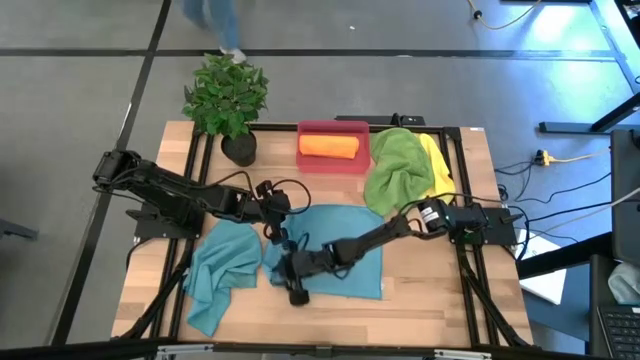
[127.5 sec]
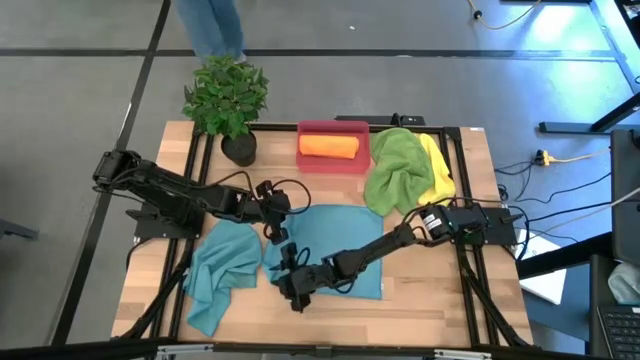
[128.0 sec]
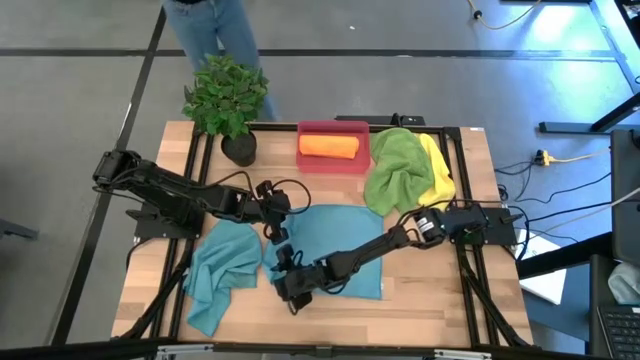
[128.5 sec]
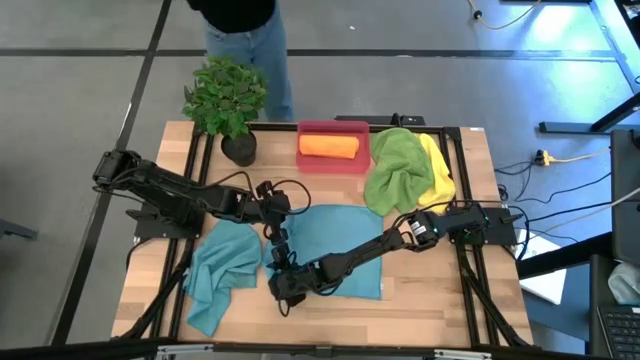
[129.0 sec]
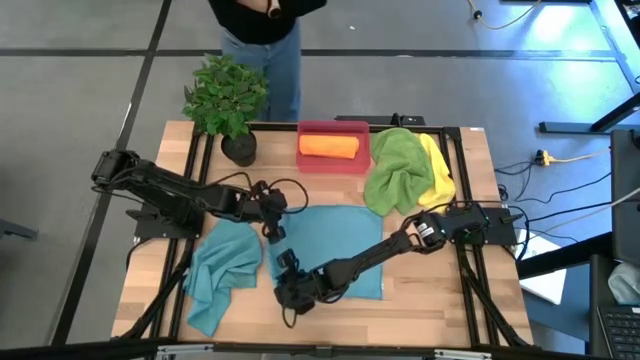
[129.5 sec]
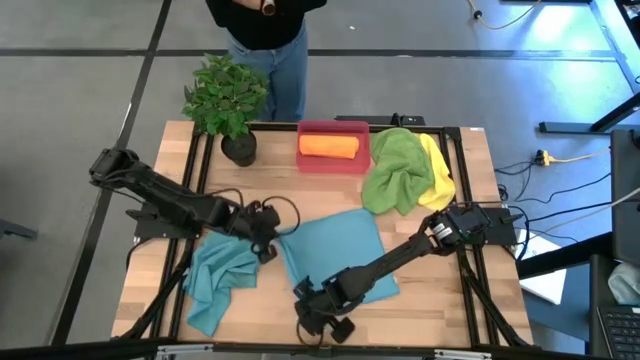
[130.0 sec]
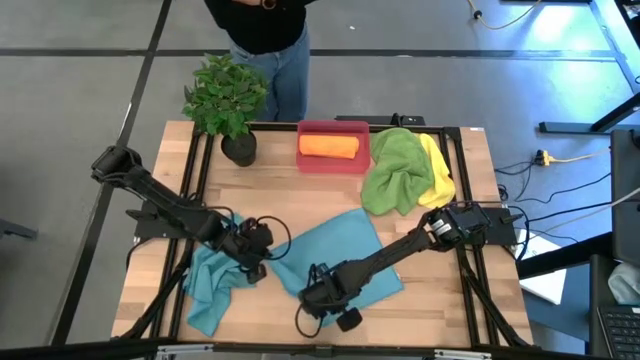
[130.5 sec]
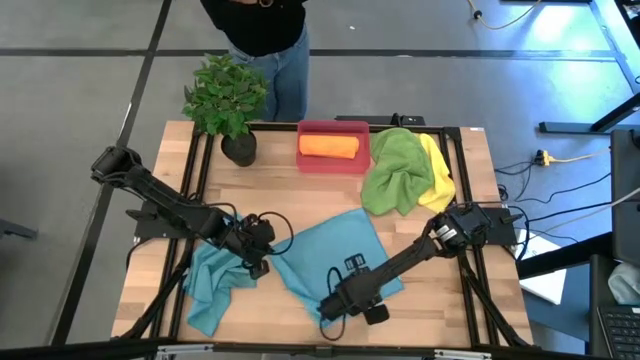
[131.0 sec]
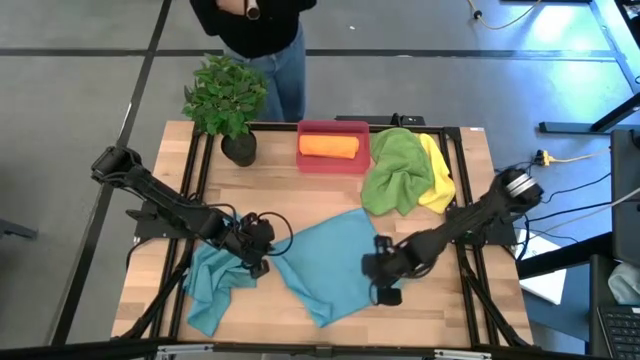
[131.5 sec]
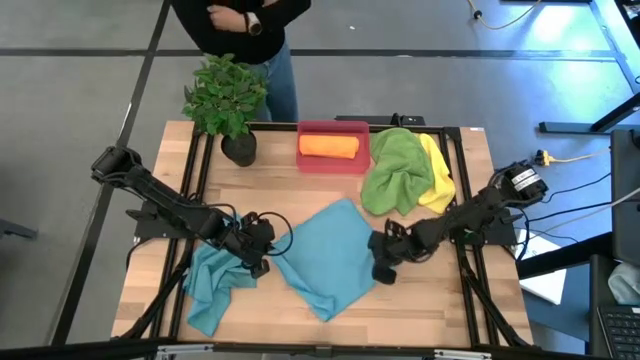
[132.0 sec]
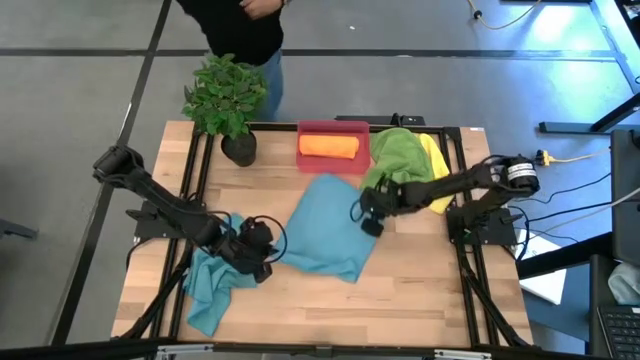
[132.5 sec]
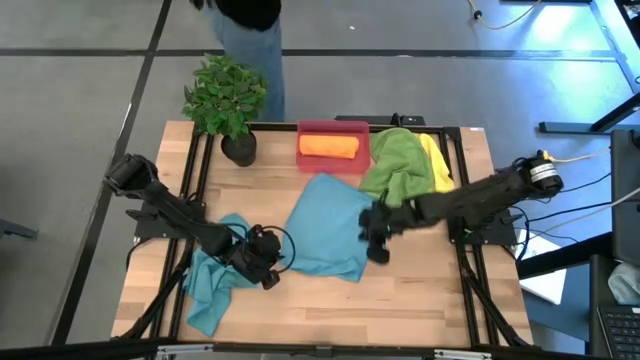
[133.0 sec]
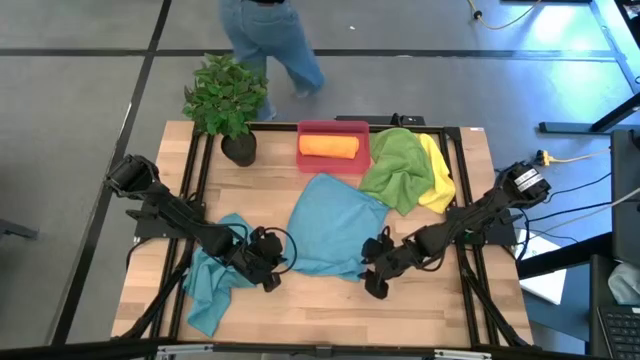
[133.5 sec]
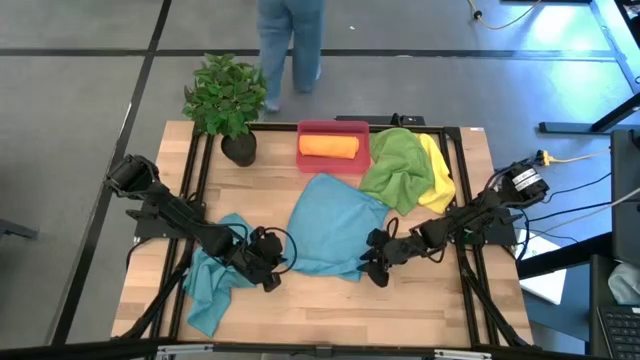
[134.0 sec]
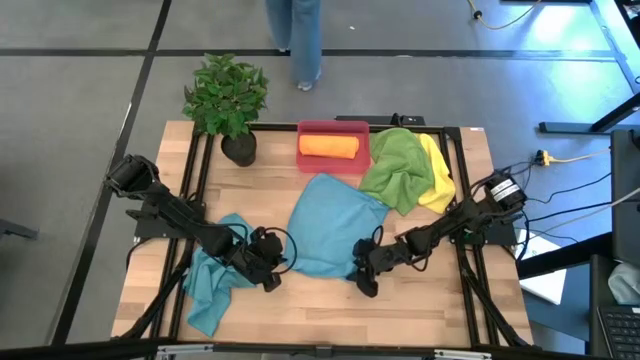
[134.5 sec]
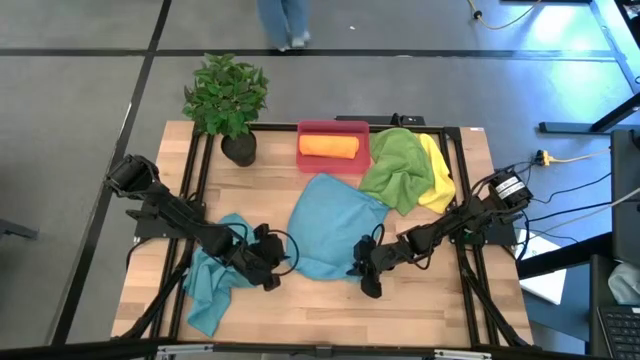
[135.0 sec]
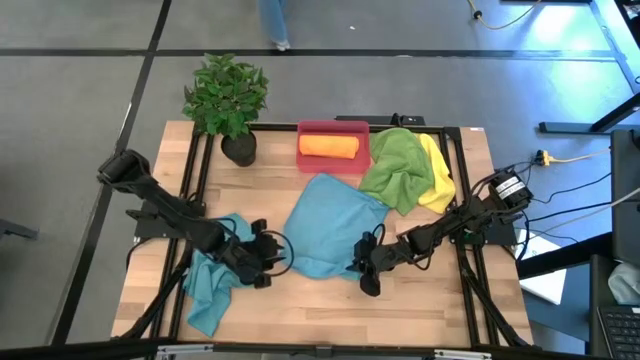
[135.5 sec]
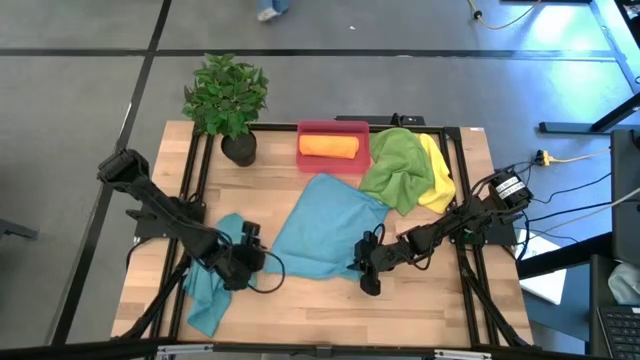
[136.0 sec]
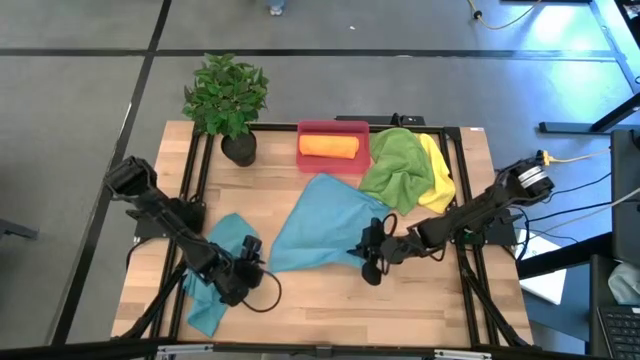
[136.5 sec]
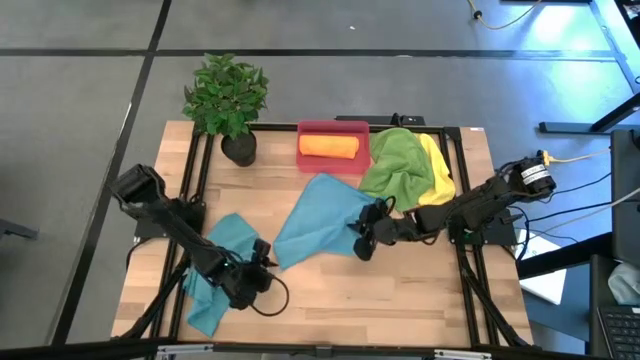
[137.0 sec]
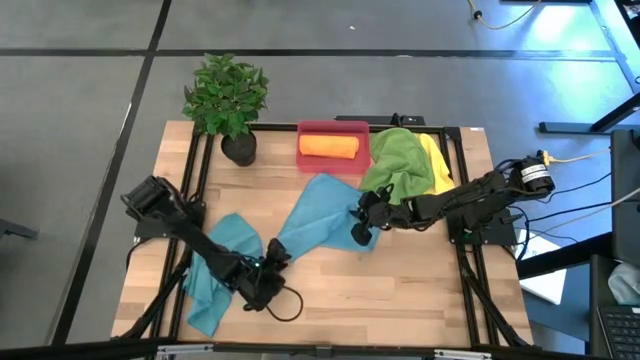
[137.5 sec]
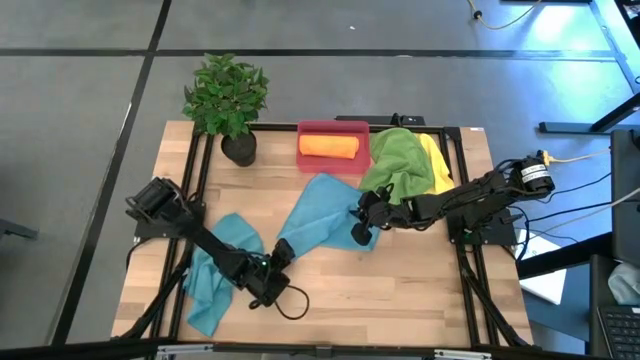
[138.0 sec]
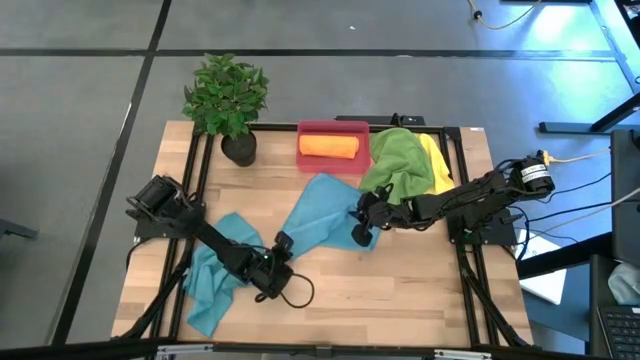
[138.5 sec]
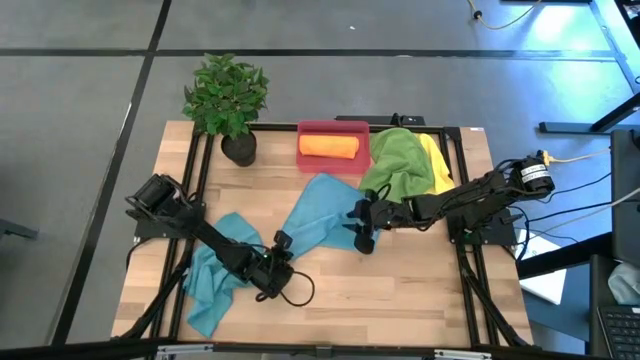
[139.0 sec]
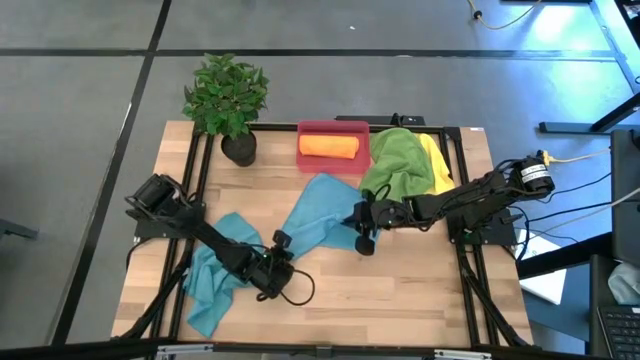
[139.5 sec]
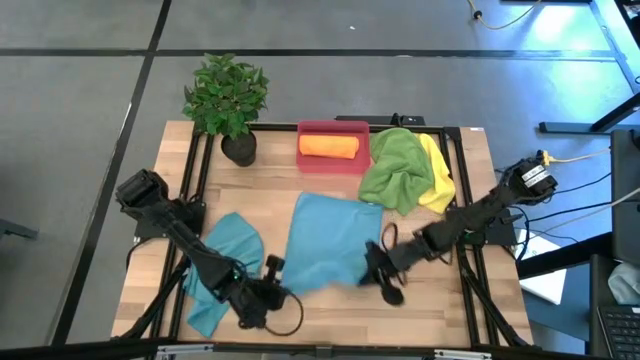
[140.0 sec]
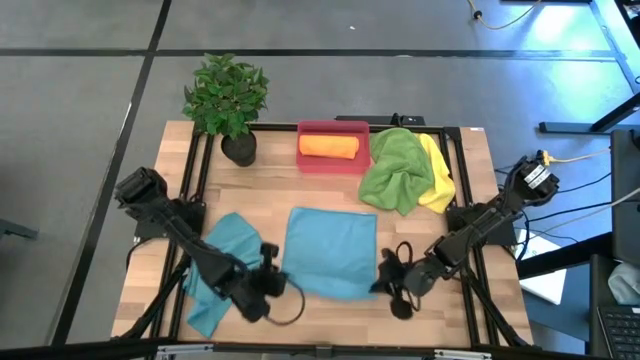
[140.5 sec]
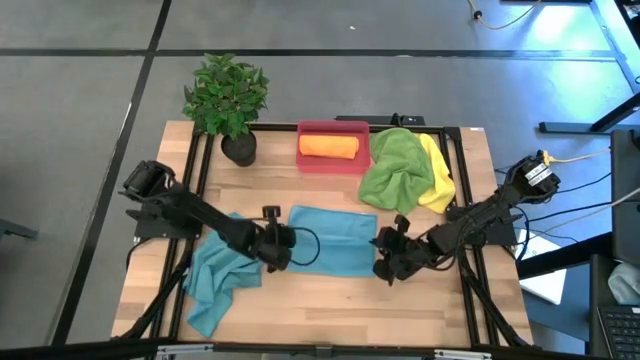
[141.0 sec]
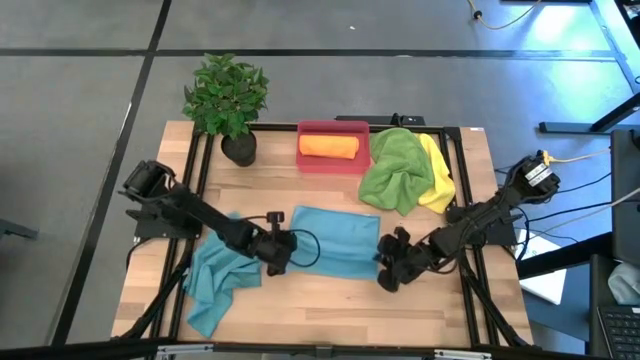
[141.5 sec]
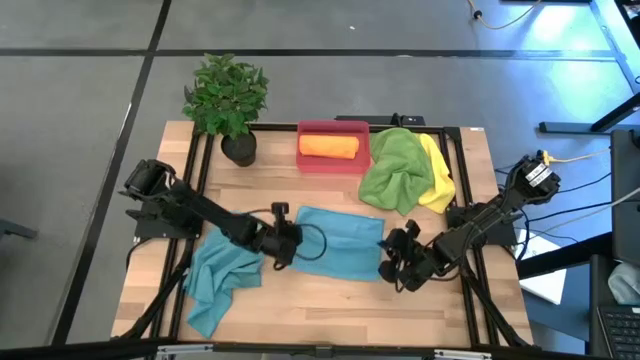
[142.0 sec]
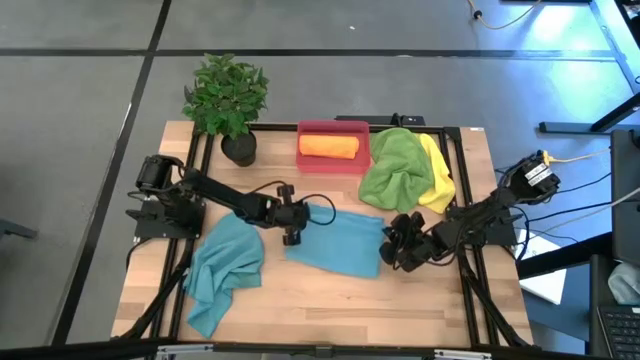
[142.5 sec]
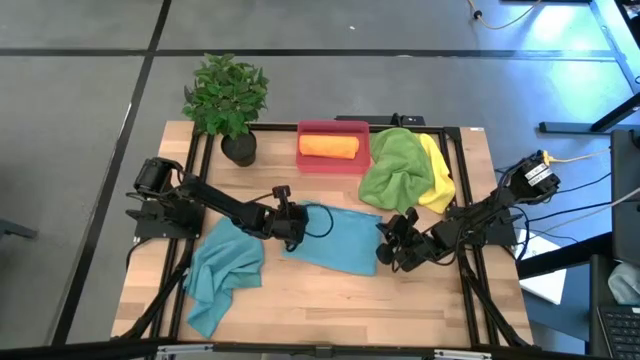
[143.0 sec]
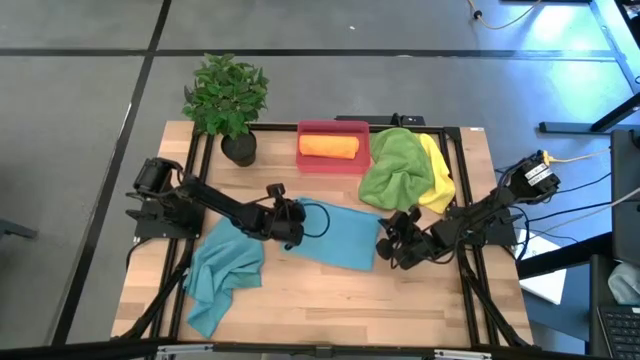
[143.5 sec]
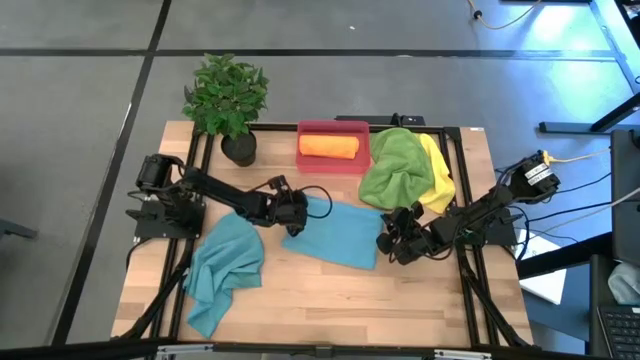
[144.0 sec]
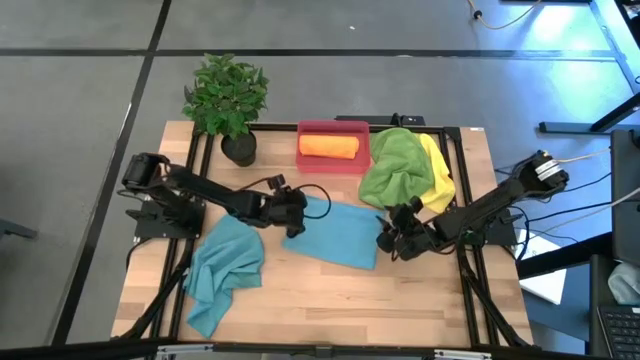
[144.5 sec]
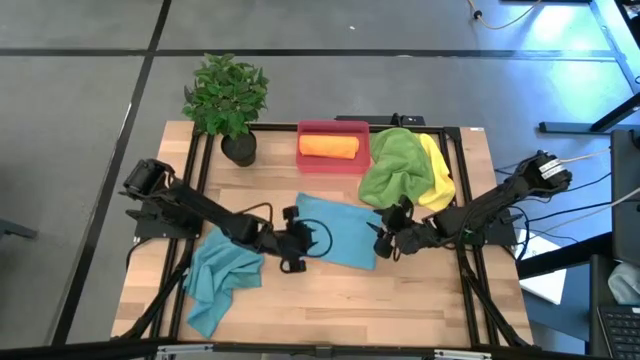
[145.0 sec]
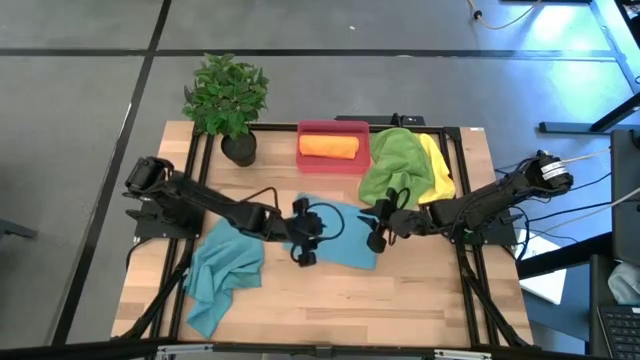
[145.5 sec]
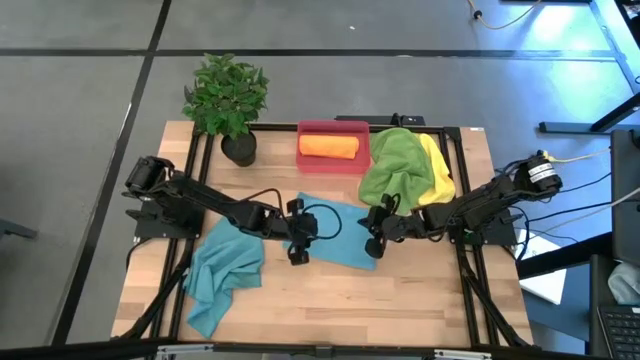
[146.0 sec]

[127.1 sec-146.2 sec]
Task: Roll microfiber towels into tight, uniform cylinder then place into a basket
Fold the right blue towel

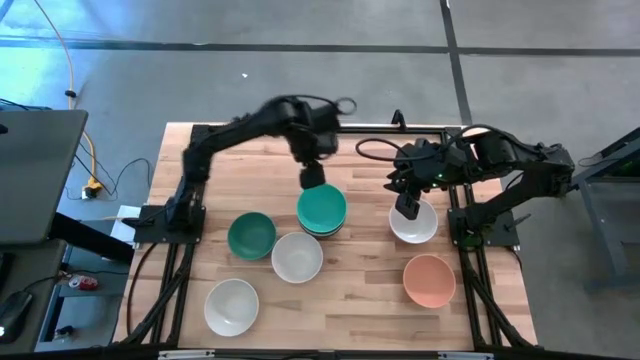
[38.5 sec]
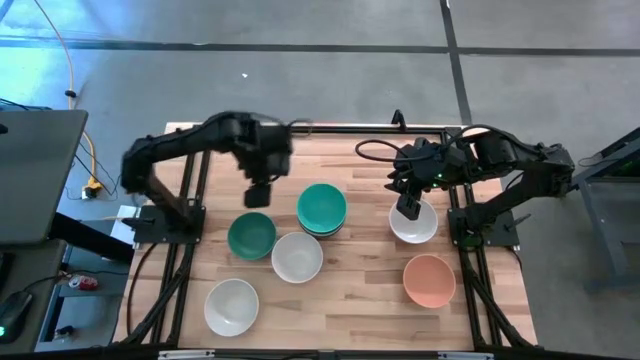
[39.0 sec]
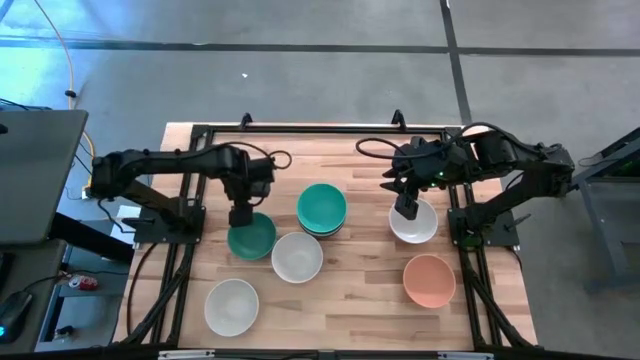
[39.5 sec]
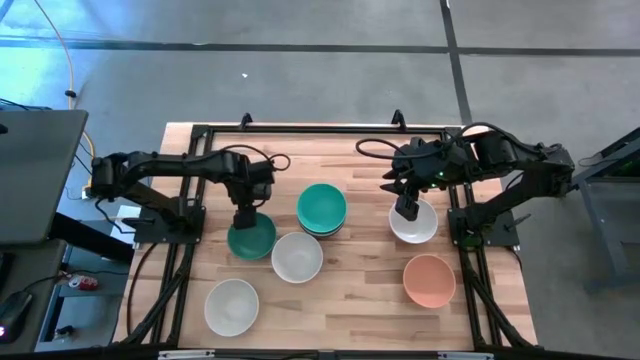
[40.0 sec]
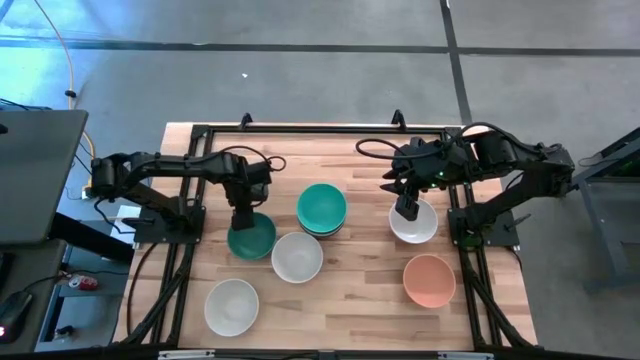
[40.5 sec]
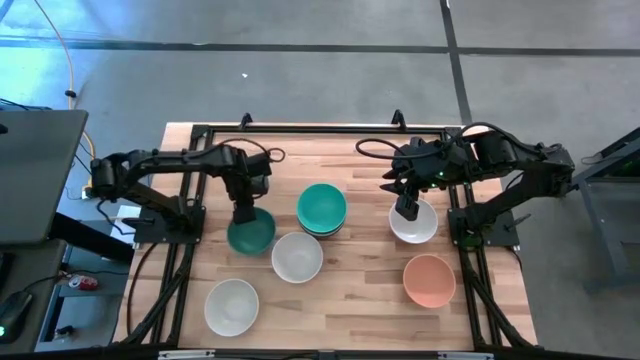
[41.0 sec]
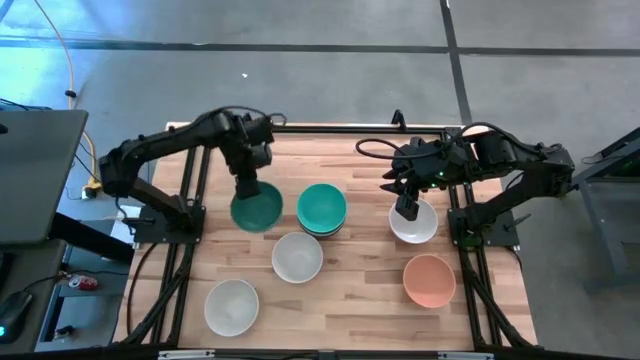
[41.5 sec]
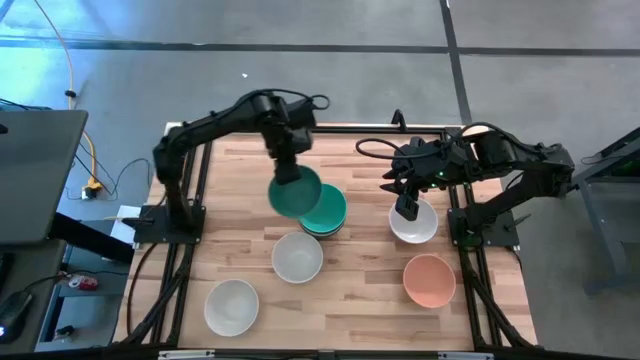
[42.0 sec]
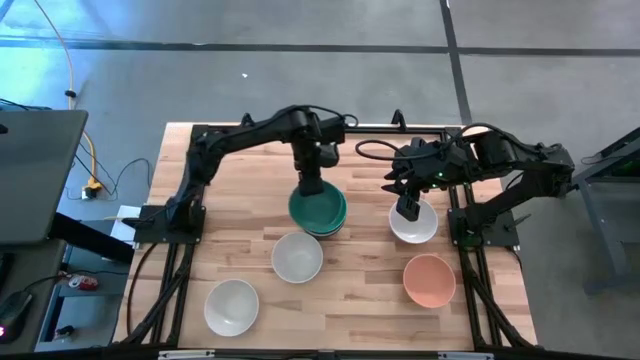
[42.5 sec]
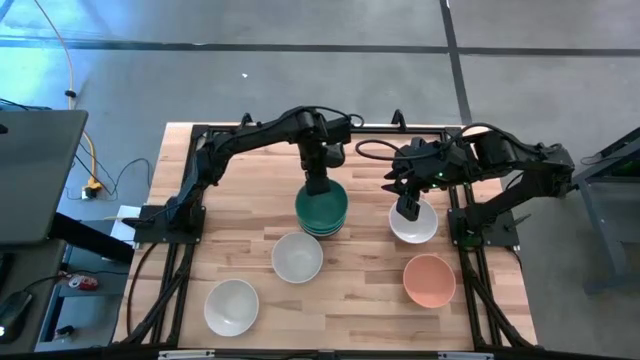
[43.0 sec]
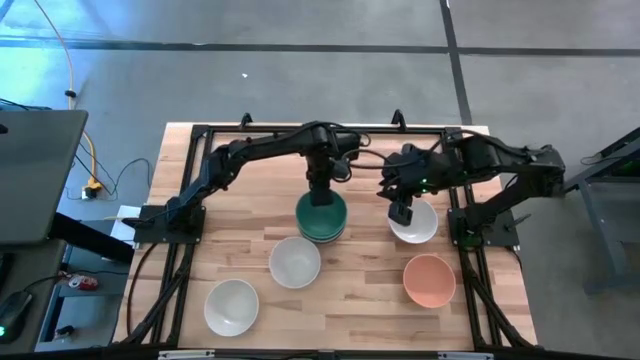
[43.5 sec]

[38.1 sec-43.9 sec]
Task: Nest bowls inside each other
Stack the green bowl on top of the light blue bowl
